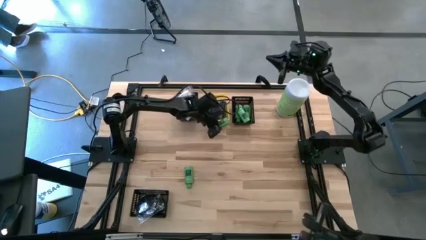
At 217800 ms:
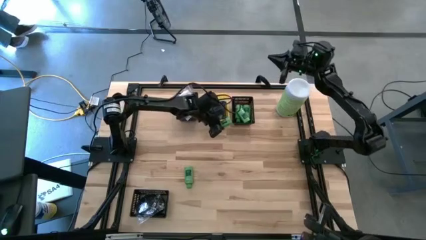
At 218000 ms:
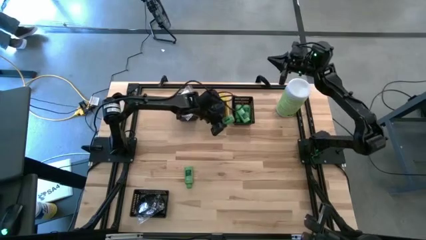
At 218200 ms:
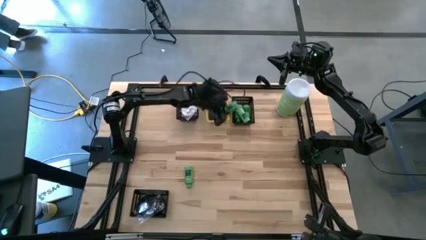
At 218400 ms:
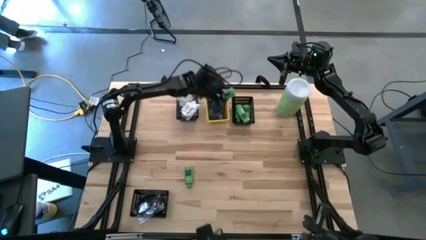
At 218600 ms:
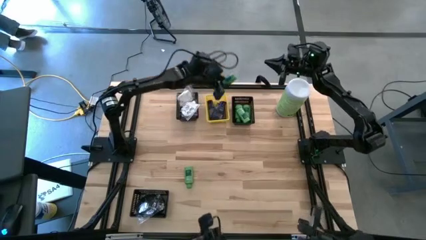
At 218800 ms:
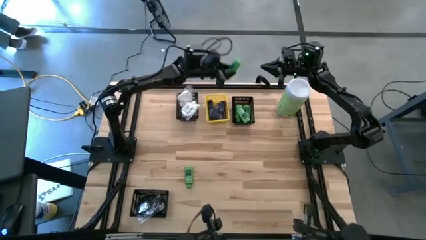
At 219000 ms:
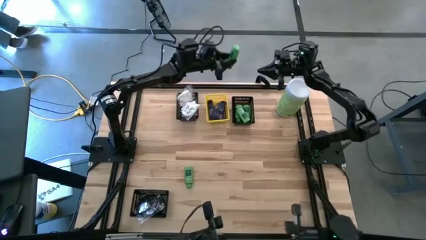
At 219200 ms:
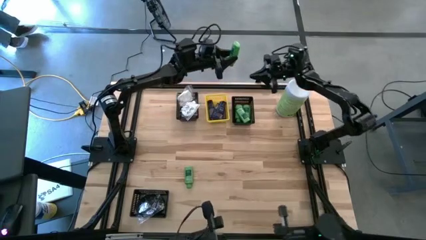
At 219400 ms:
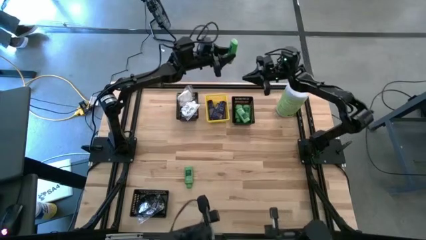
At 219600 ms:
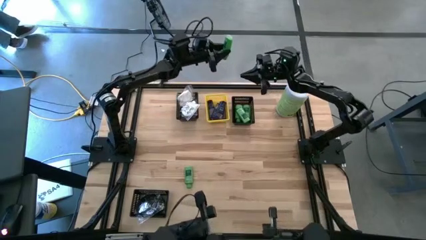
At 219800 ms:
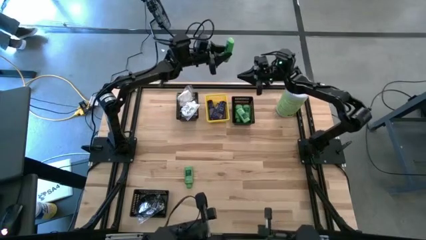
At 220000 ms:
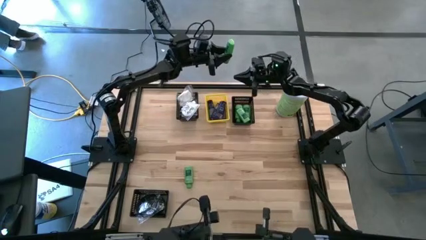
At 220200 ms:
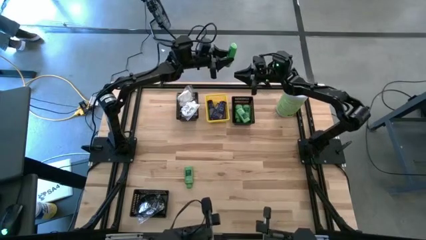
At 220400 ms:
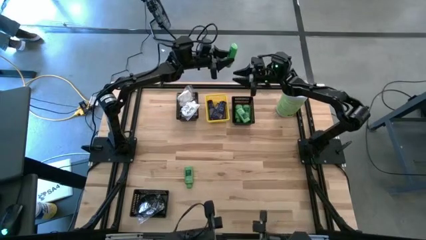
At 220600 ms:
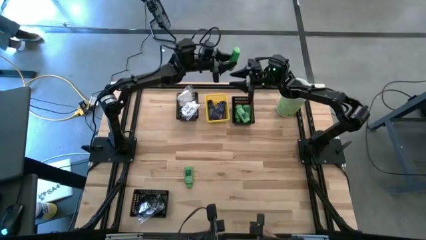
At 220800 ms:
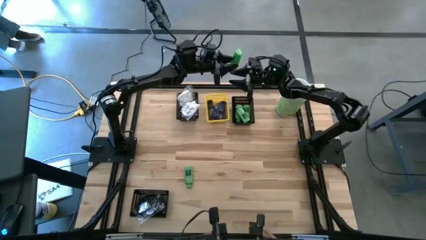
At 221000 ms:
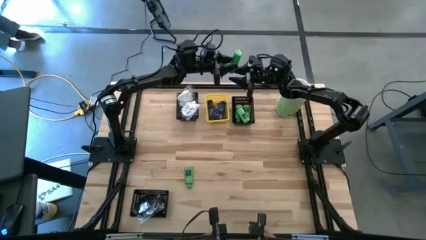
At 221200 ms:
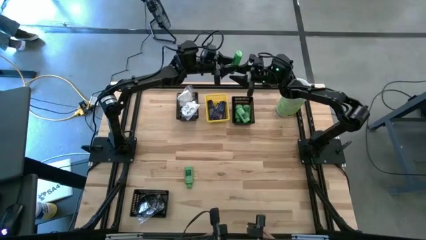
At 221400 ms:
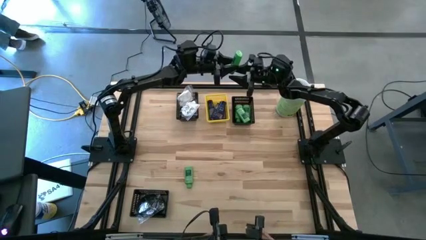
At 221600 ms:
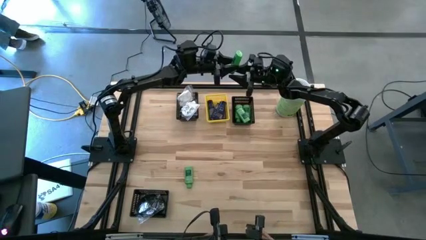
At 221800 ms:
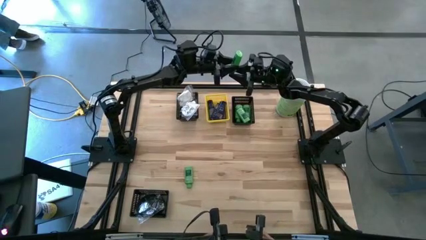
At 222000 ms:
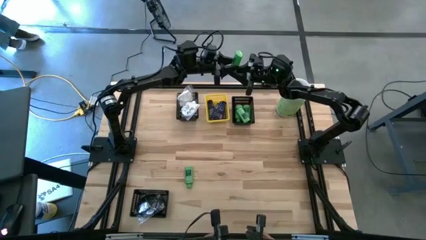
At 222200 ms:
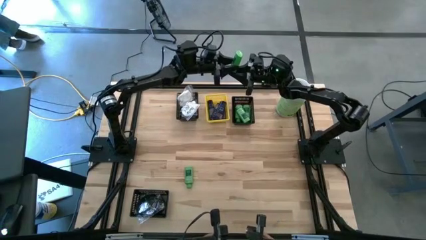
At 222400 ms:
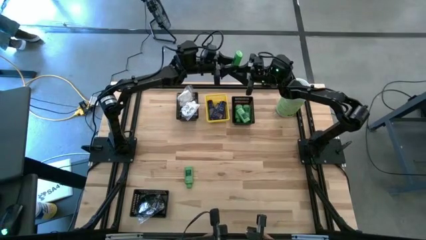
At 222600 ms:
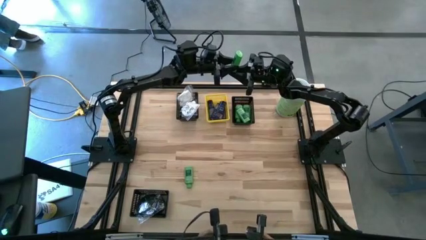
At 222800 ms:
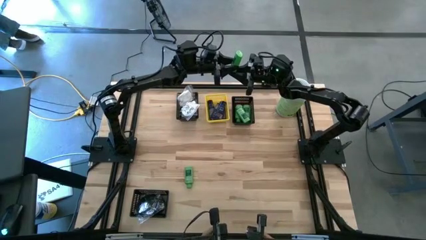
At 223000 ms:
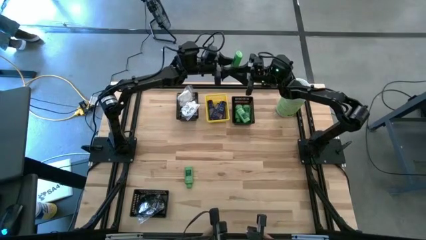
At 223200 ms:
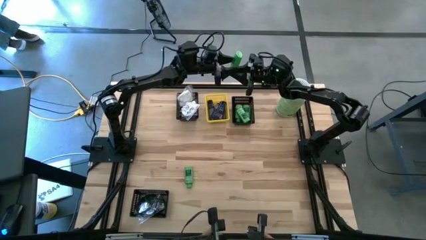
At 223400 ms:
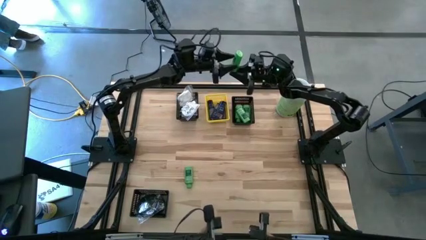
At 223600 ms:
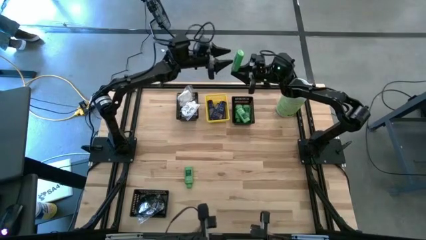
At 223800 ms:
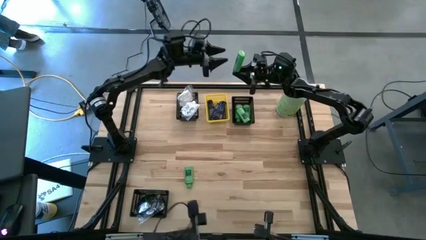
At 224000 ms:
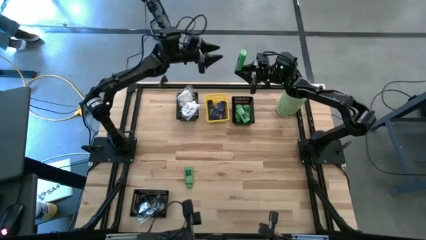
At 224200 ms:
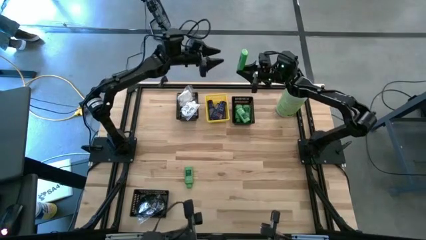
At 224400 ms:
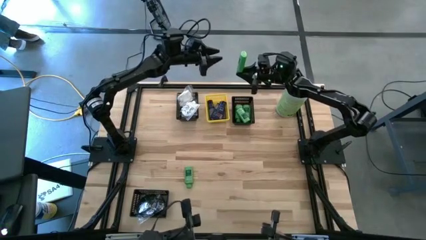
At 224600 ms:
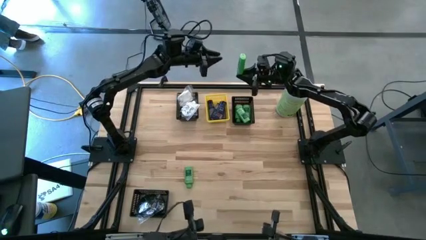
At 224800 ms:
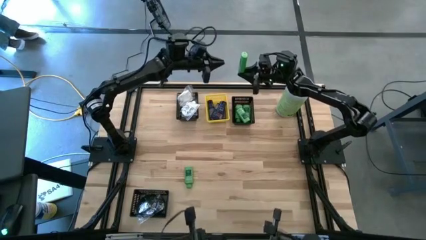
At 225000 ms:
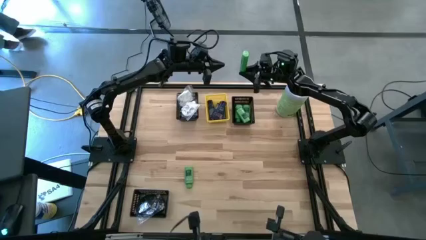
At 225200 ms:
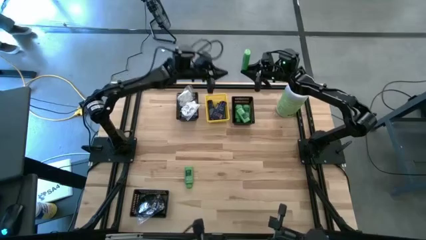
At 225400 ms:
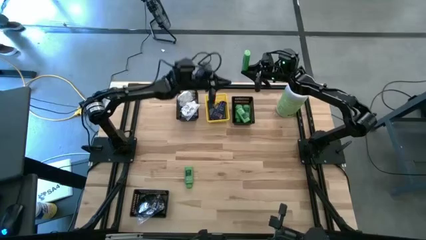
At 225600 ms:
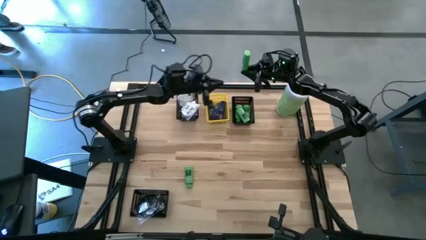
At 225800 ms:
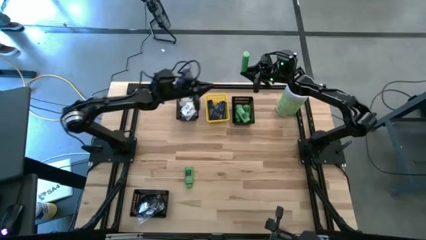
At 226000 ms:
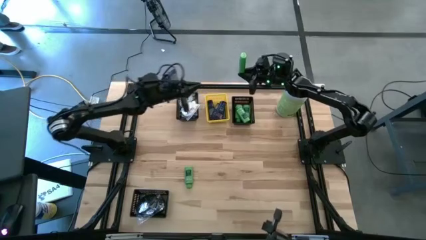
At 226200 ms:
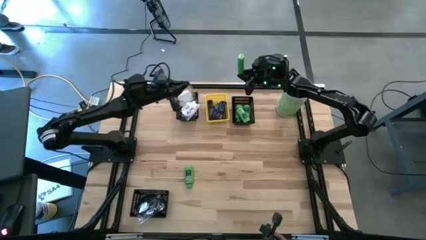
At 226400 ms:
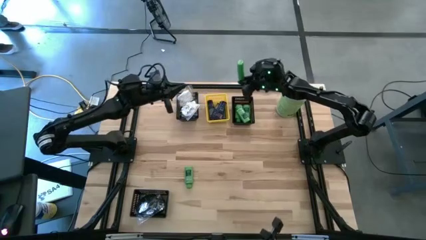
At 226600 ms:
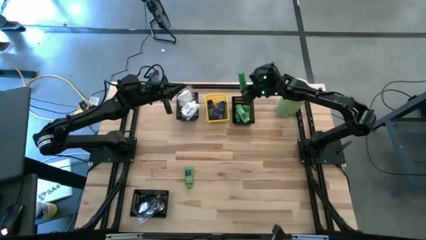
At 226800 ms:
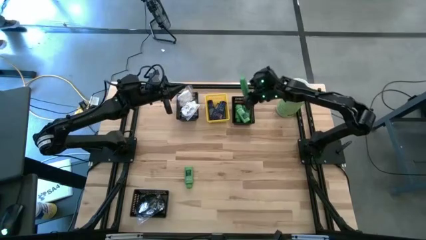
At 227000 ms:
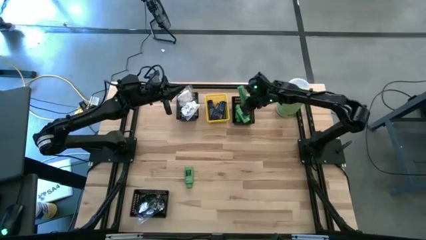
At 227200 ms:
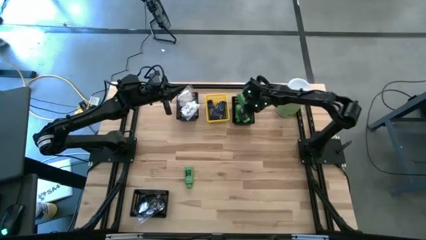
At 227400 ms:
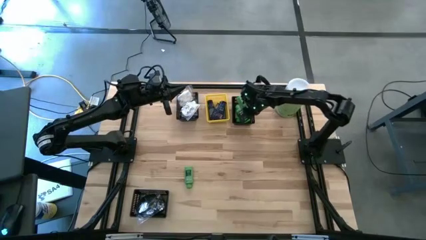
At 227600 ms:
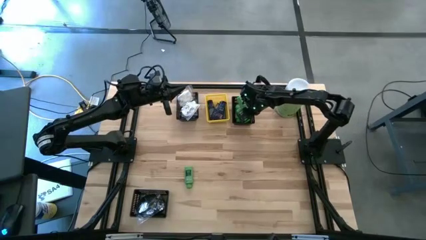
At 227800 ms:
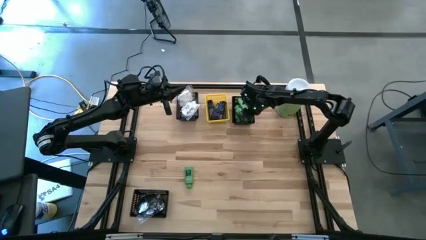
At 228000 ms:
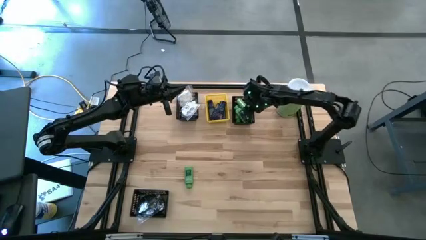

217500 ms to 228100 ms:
Task: Pick & Place Travel size toiletries
Put the green shampoo bottle into the top right black bin

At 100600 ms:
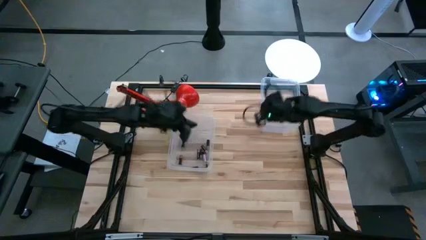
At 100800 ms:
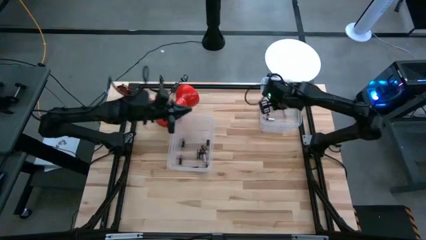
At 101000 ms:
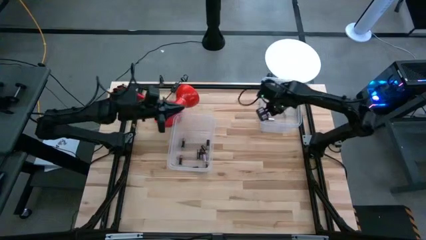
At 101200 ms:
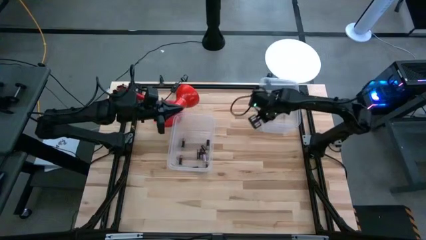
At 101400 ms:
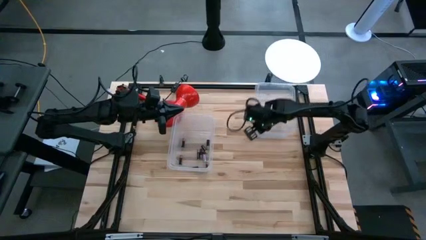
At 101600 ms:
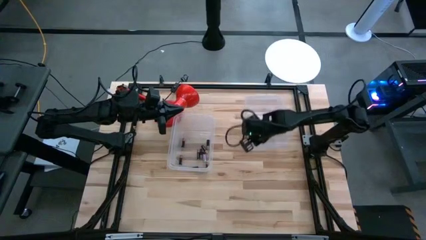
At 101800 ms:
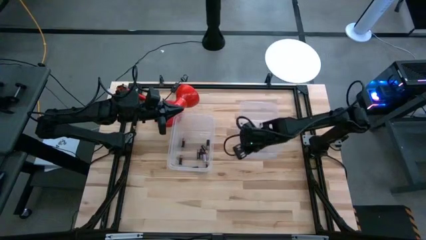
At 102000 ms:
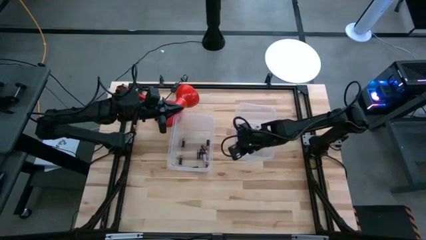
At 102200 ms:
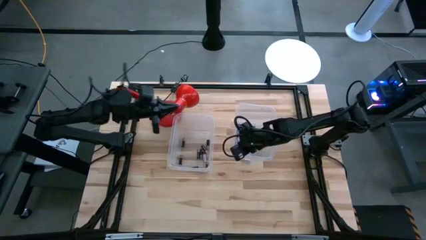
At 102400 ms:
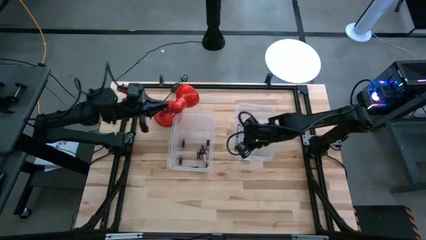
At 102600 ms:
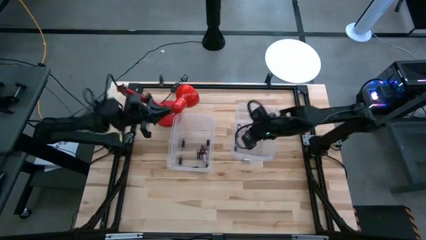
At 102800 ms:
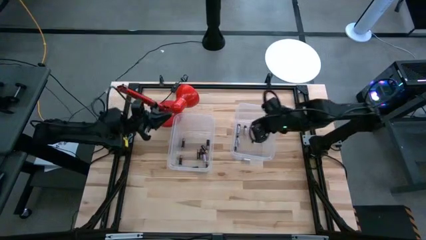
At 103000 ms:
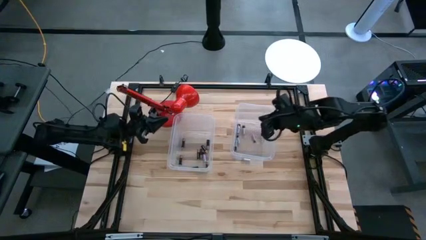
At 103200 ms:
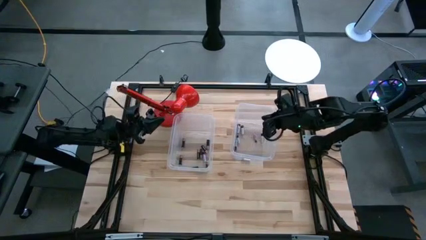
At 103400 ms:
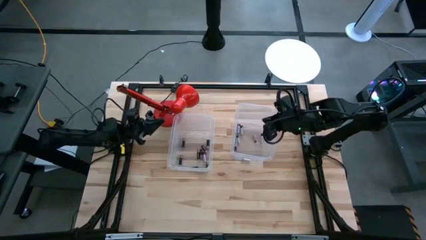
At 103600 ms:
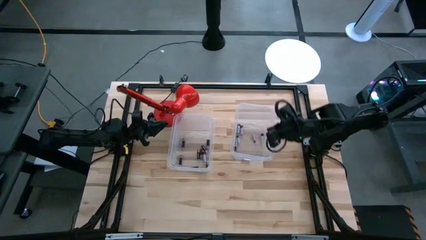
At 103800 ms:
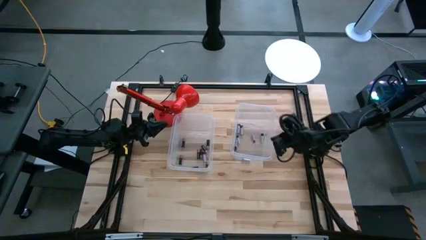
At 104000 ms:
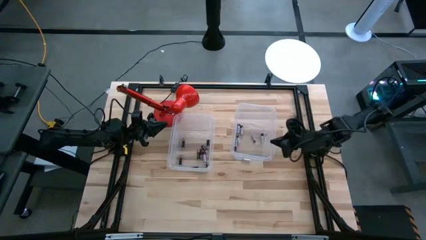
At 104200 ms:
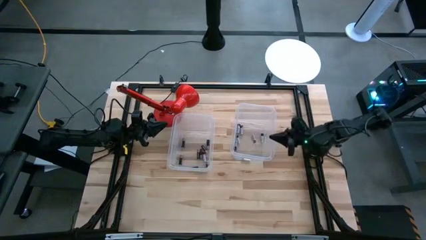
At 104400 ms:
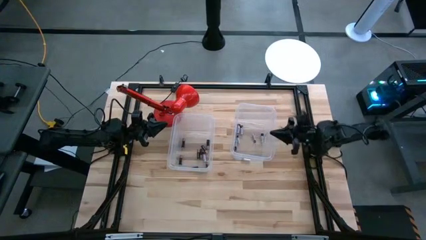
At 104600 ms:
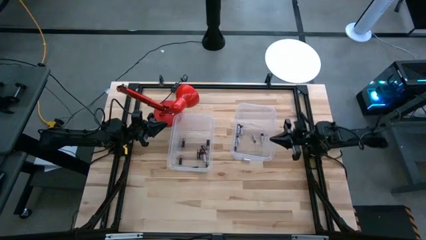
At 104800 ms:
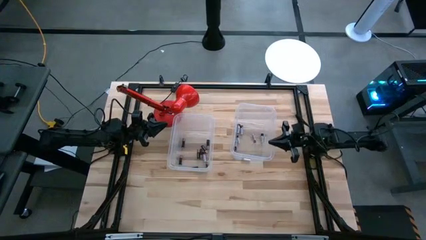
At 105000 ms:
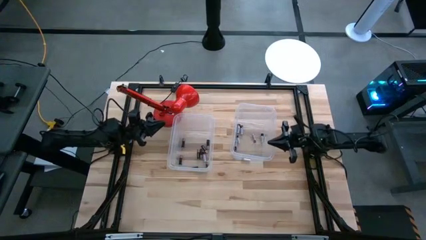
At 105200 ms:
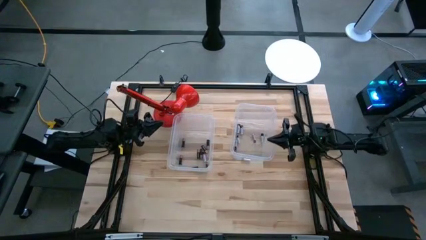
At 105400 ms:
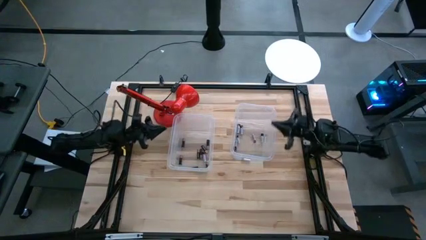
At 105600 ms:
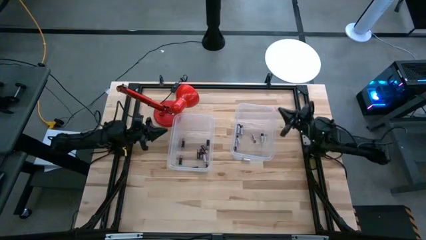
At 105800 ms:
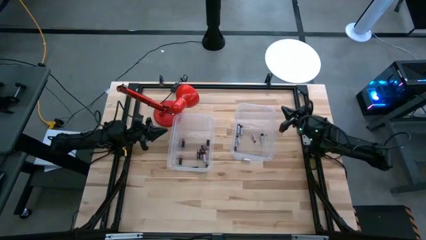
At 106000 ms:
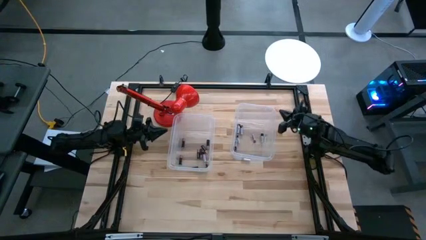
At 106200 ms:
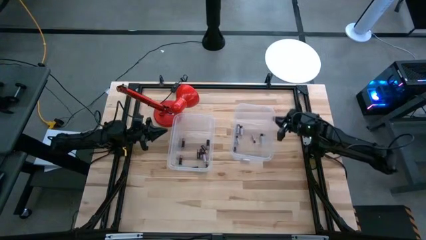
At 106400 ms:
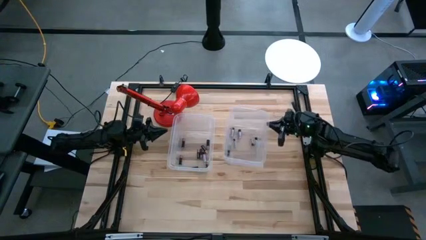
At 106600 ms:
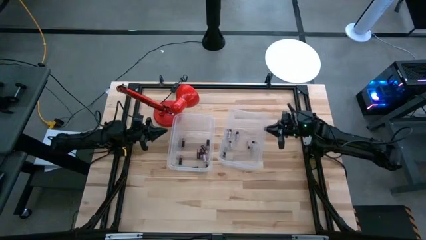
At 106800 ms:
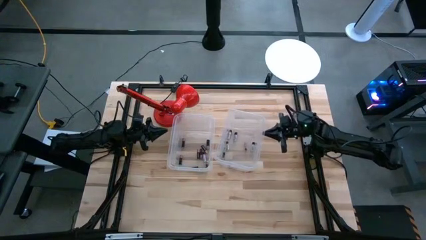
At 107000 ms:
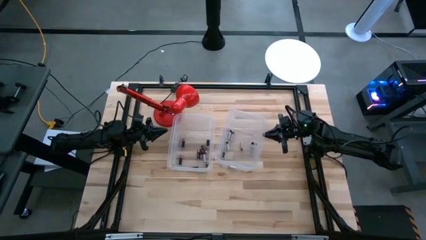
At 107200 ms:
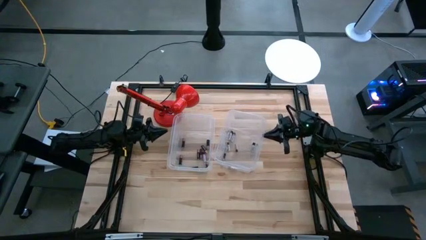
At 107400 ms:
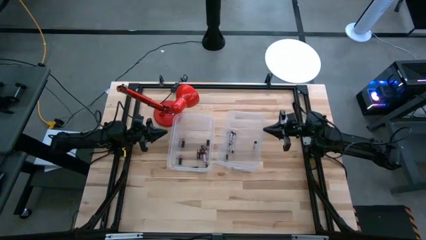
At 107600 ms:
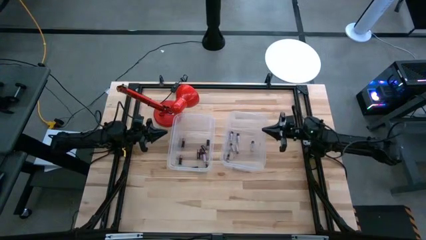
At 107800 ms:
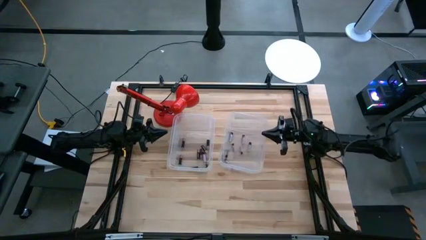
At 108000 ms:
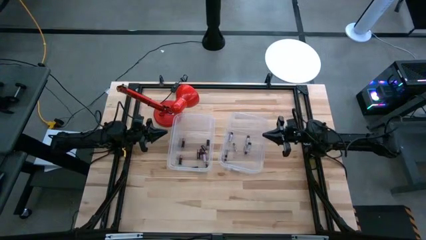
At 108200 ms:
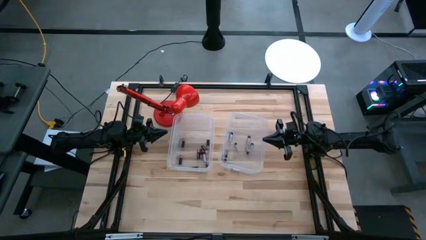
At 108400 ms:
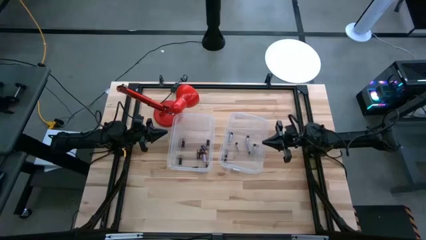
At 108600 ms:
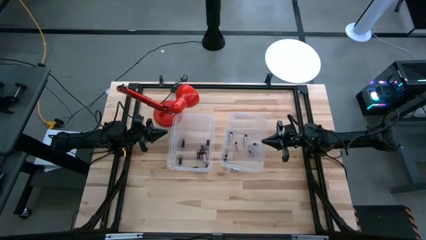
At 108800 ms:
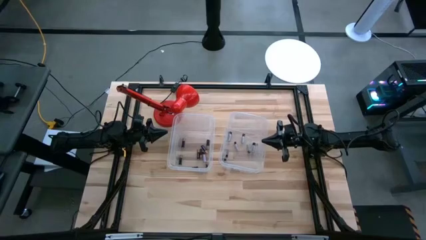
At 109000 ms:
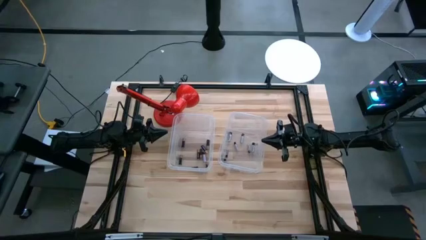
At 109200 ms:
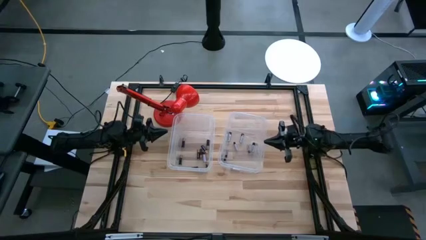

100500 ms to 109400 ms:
Task: Sort batteries
Move the top transparent bin to the center of the table
